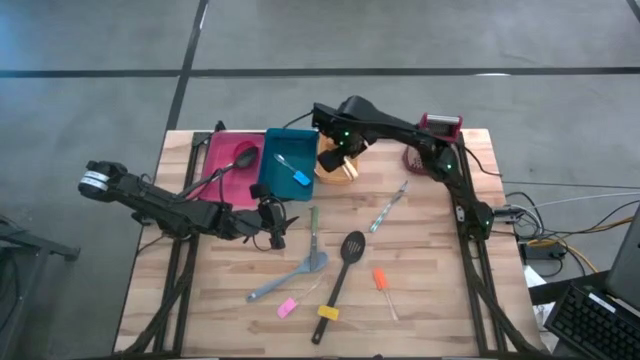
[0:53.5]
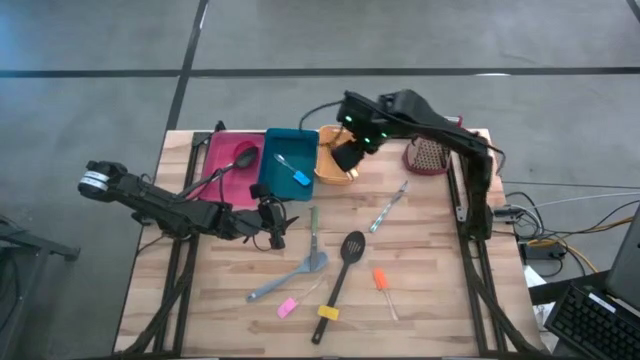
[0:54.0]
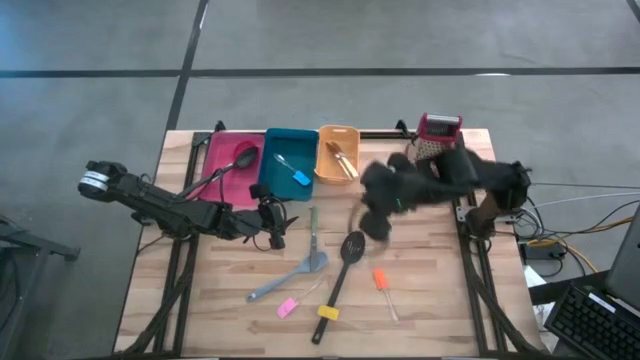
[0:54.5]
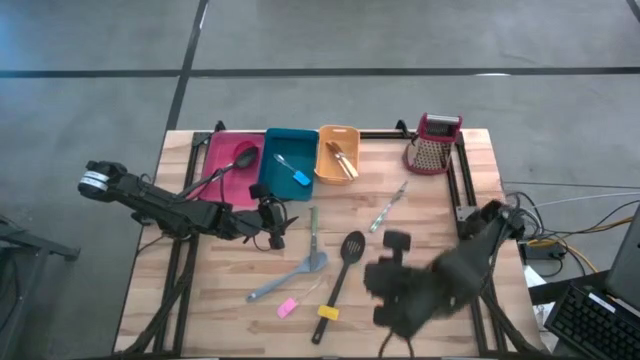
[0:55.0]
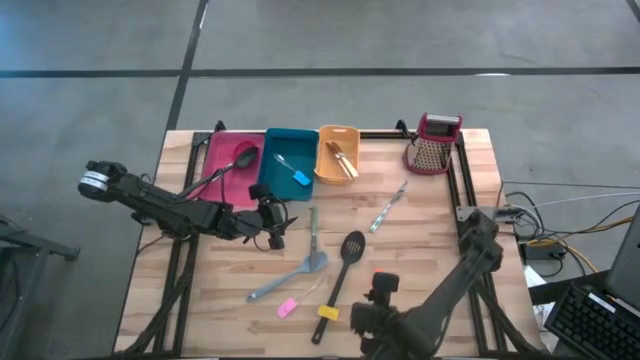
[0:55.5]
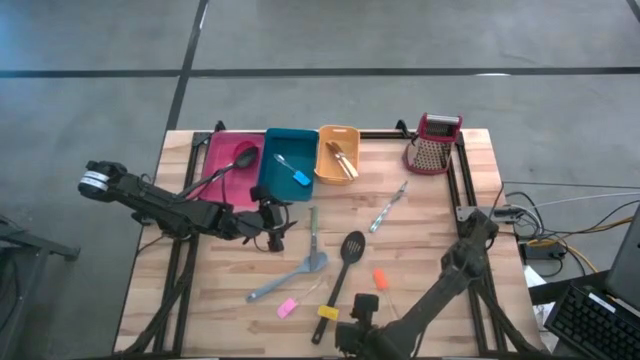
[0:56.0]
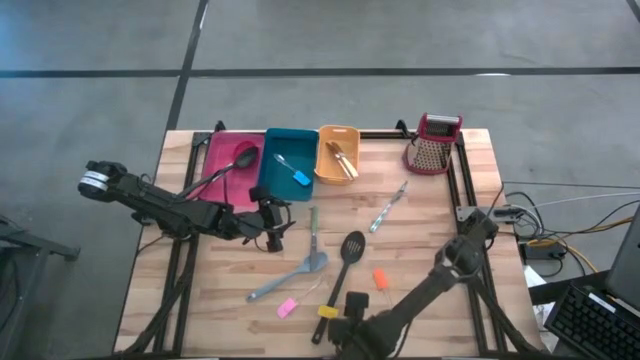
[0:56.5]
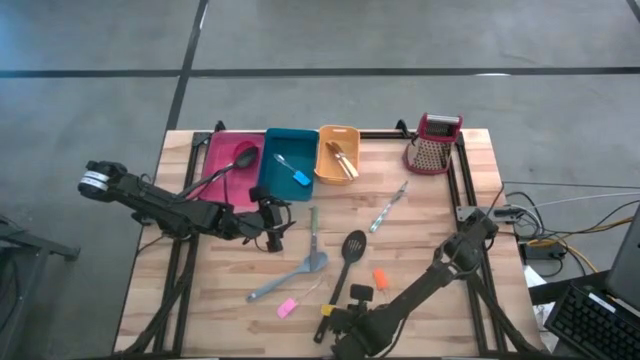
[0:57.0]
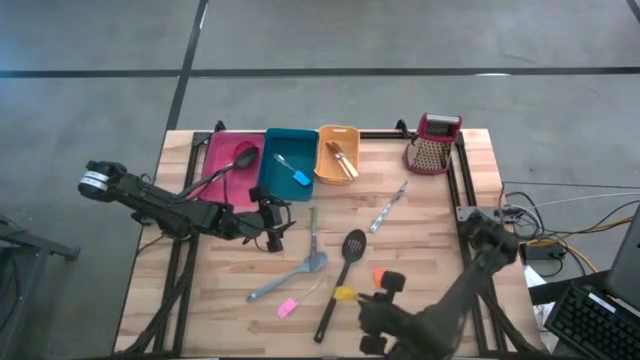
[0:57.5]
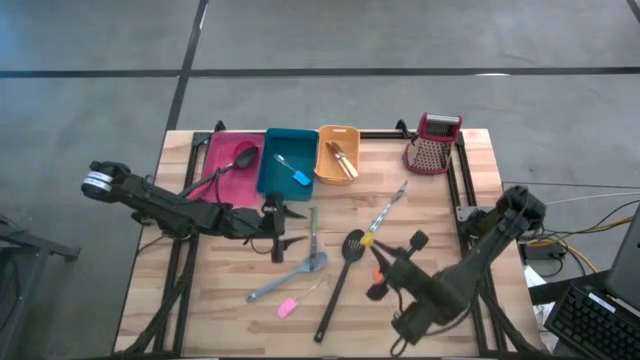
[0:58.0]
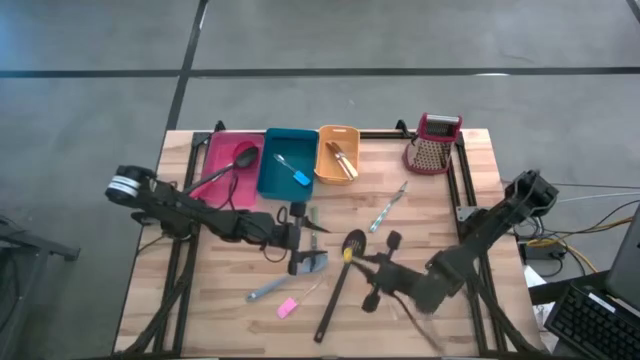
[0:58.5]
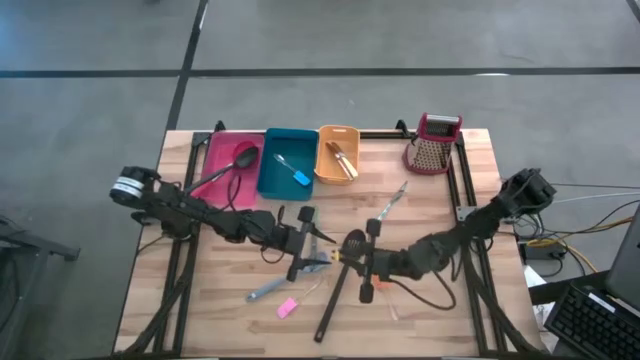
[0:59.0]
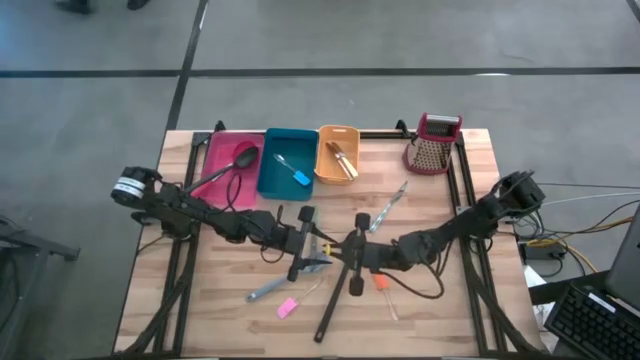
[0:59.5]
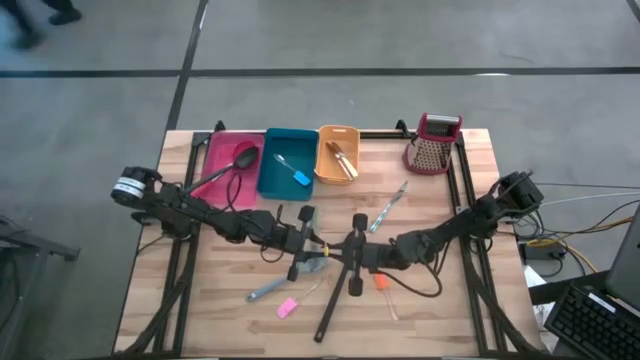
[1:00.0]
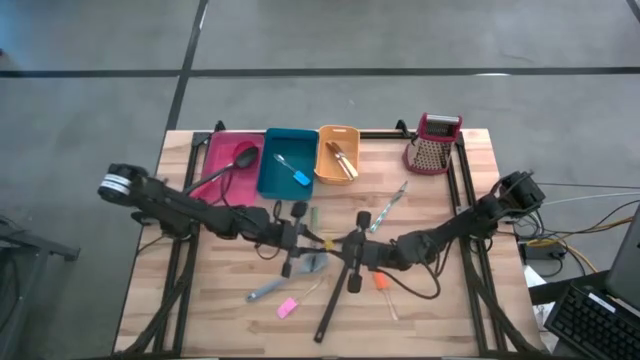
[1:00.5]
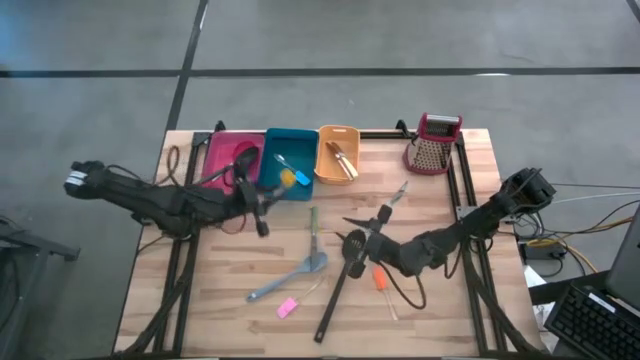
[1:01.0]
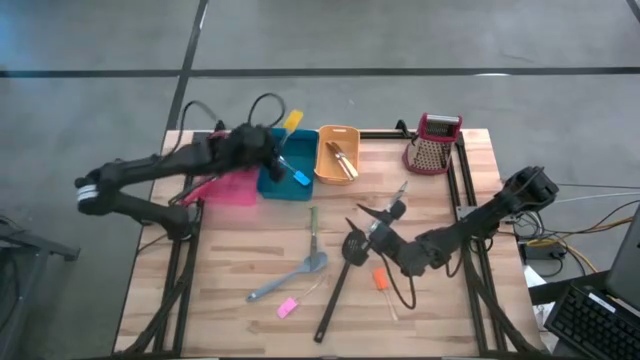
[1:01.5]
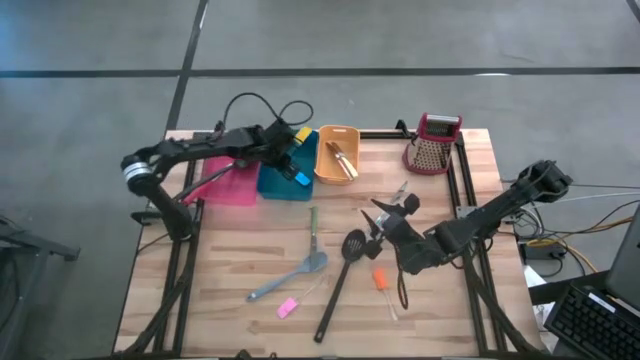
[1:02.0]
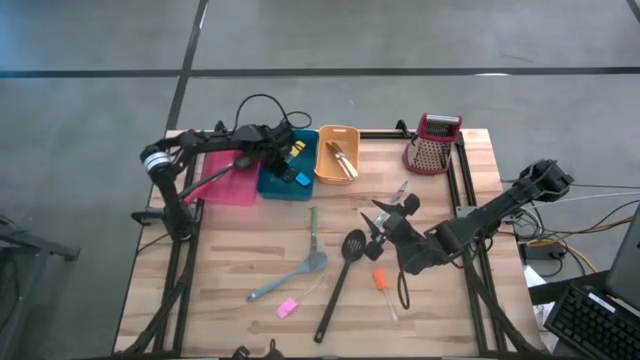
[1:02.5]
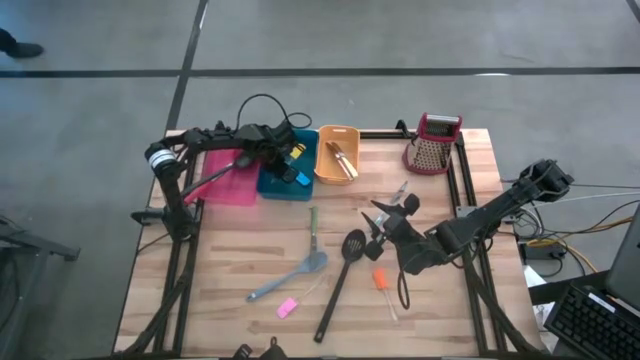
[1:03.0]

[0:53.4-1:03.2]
Task: Pick & Place Kitchen Items
Put the yellow spatula into the blue bin

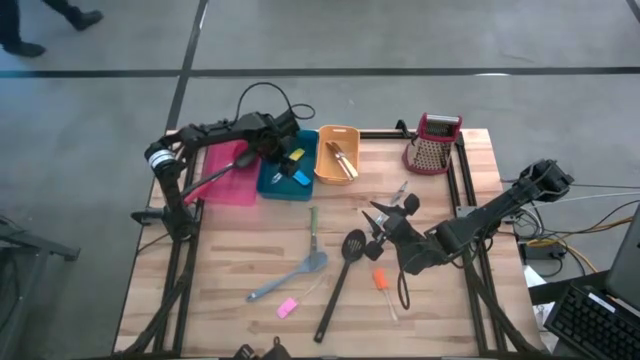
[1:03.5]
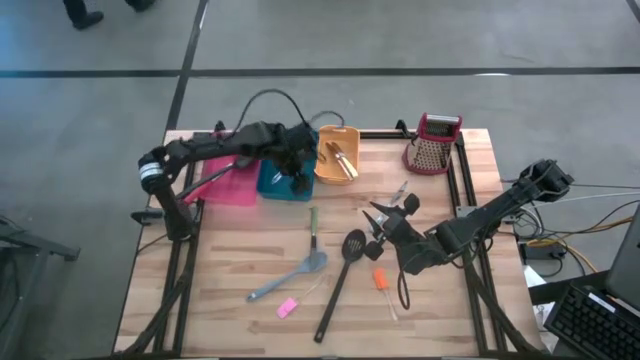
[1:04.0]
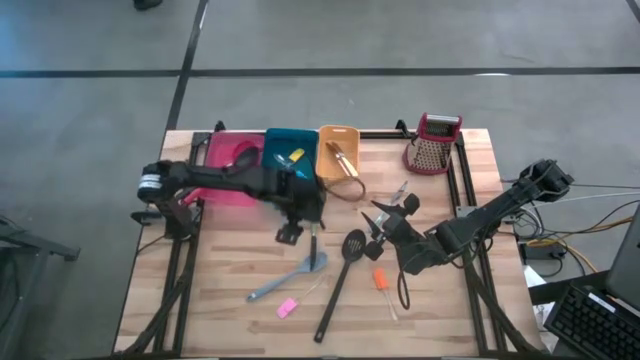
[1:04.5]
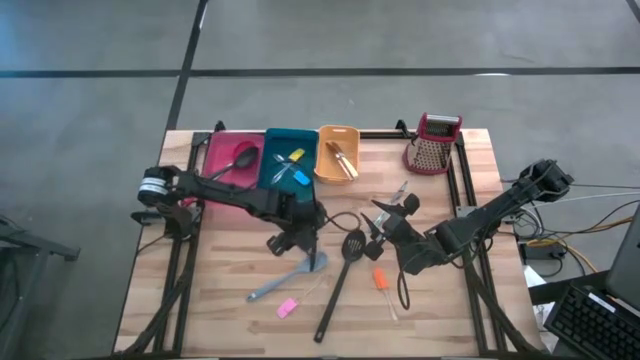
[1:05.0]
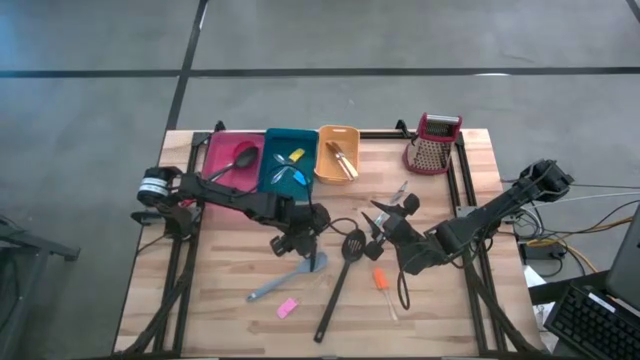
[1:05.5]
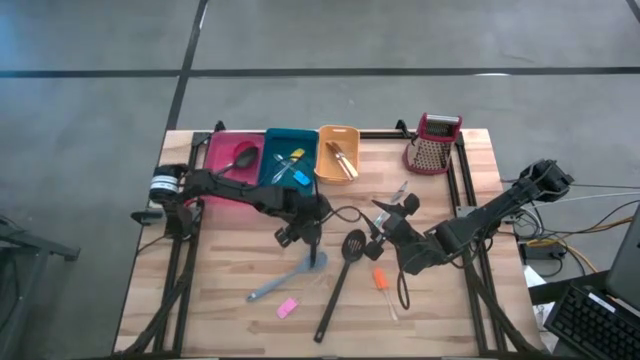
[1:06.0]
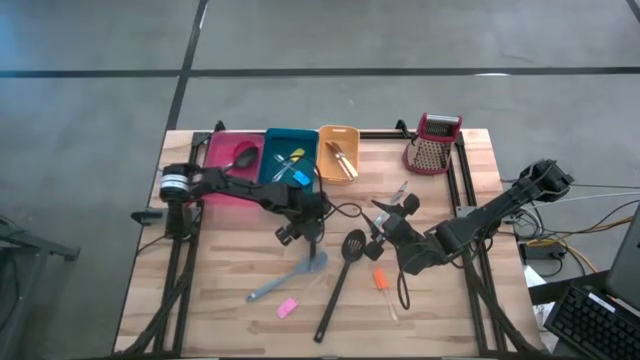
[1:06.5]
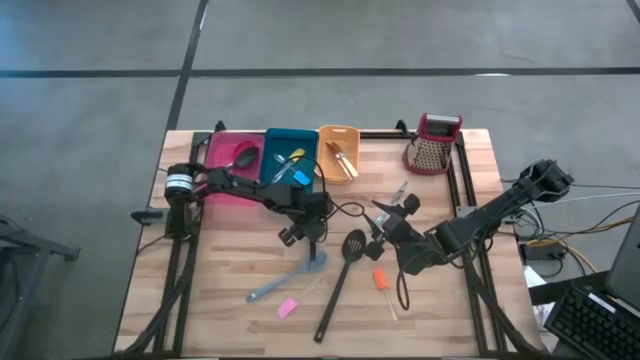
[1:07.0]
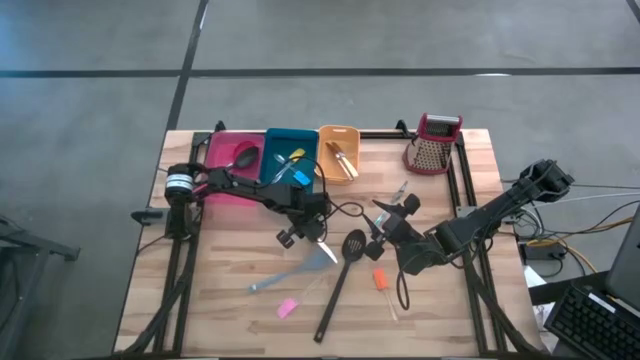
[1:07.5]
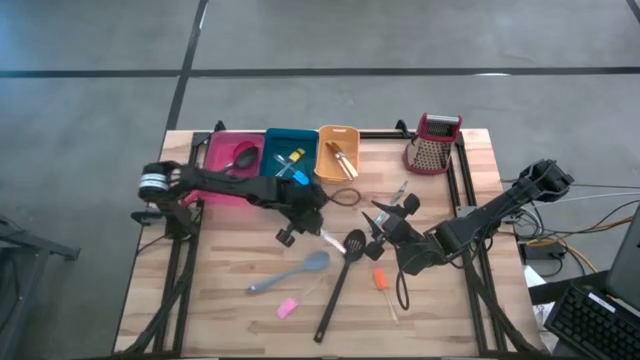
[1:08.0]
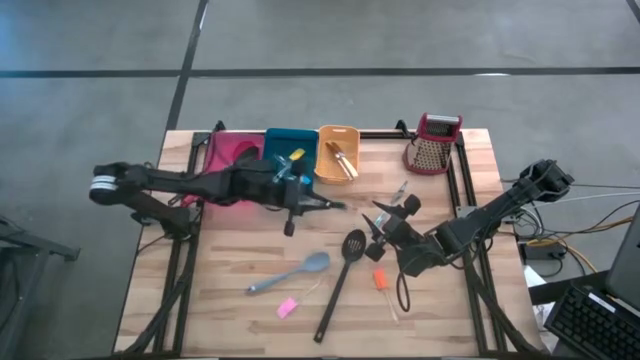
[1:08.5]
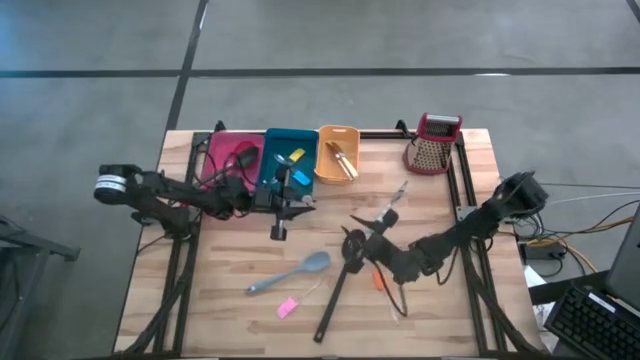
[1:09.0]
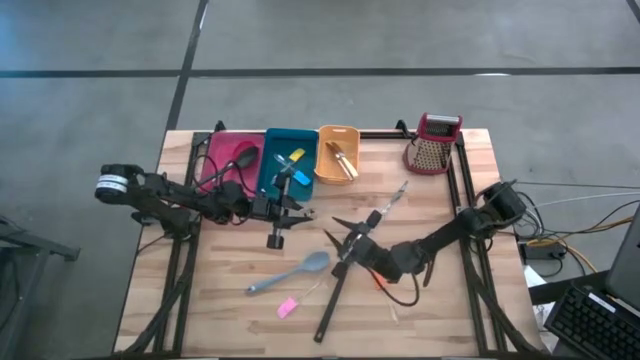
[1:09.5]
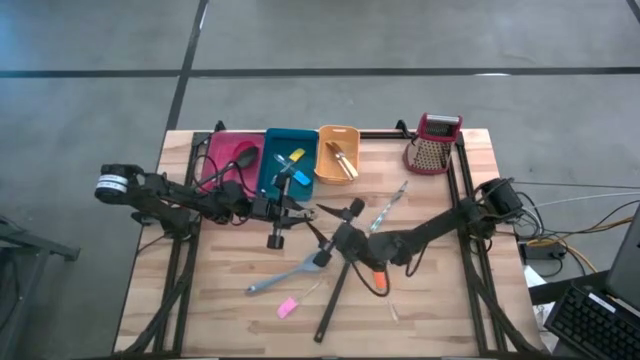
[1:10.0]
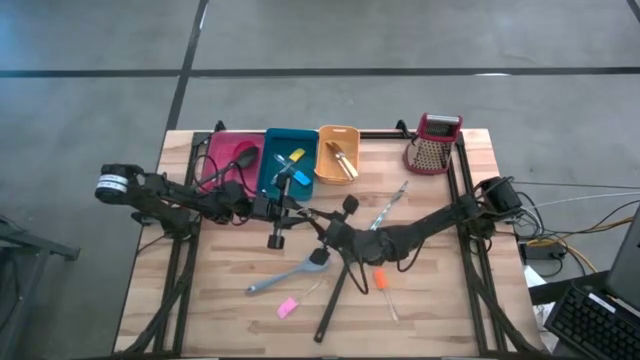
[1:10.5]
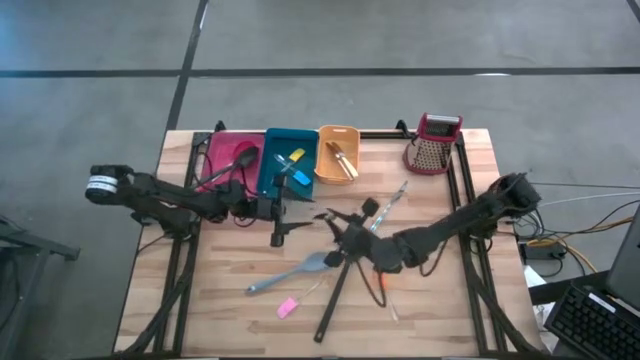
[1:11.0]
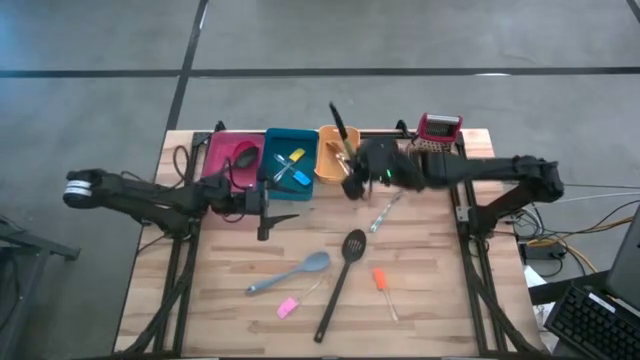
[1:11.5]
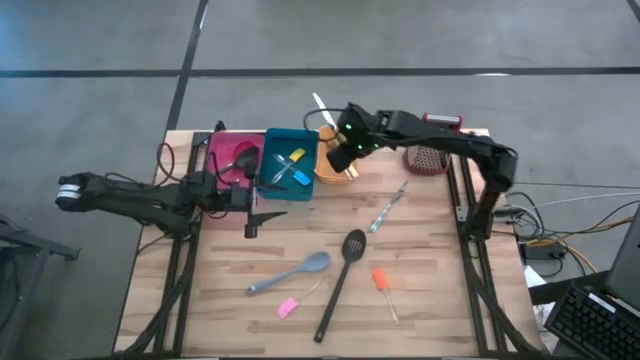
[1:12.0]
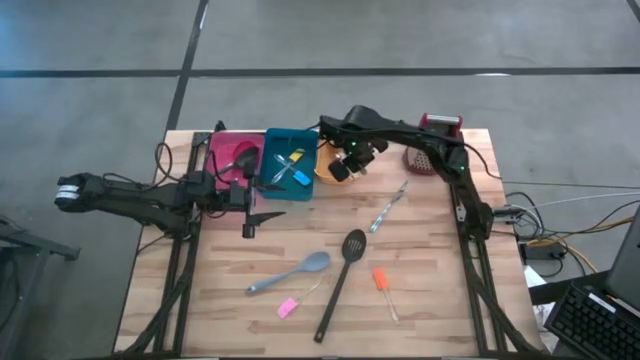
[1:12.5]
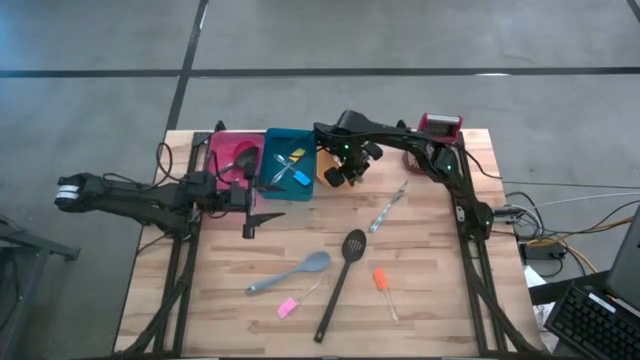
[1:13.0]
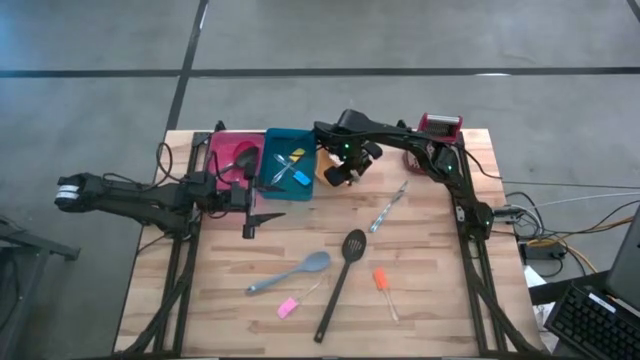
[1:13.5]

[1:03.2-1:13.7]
Put the green knife into the yellow bin

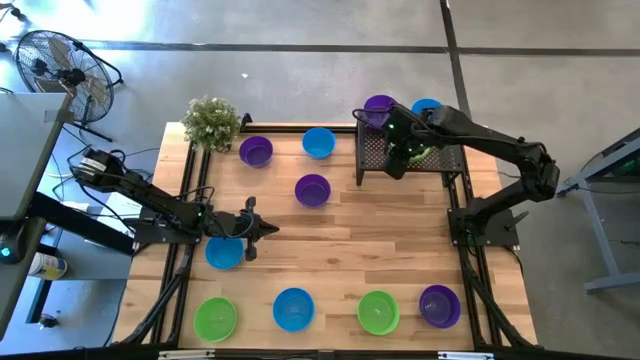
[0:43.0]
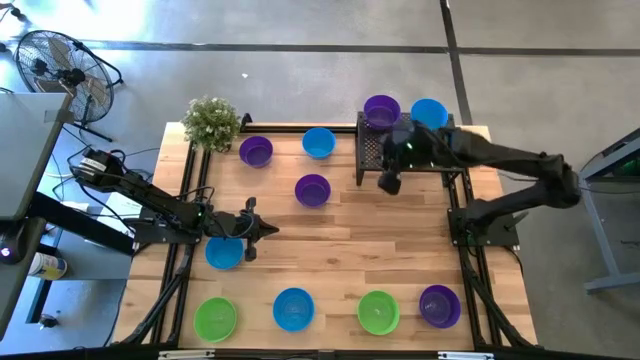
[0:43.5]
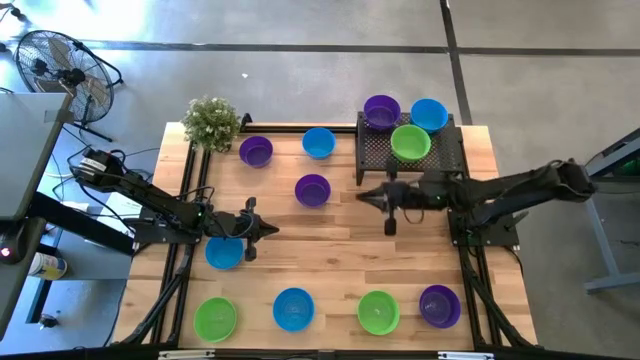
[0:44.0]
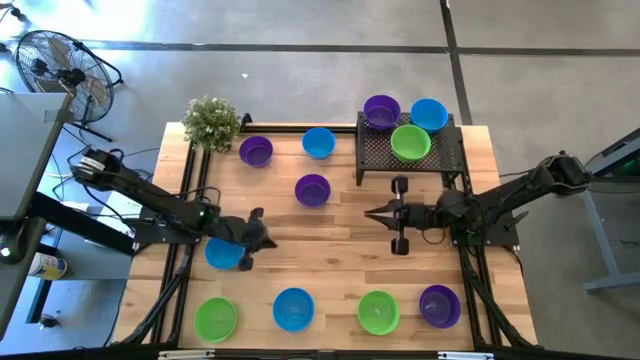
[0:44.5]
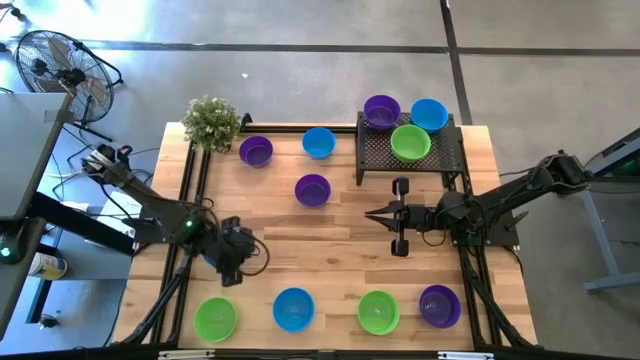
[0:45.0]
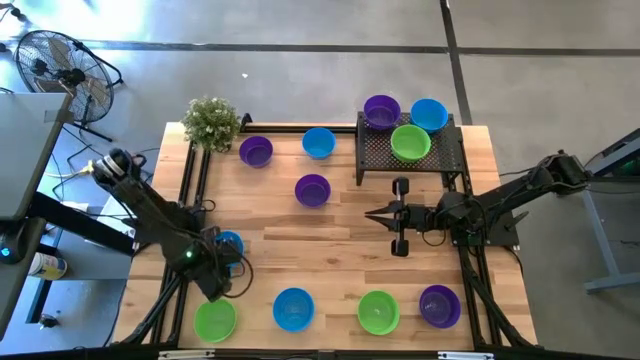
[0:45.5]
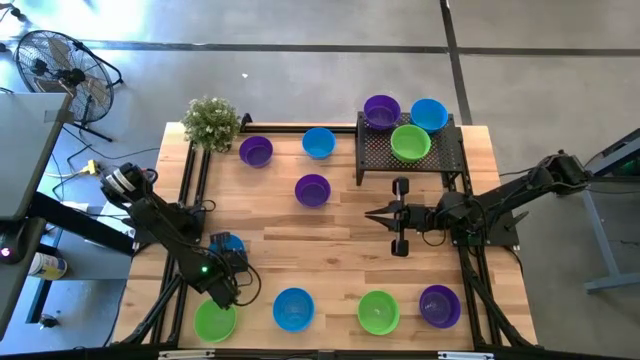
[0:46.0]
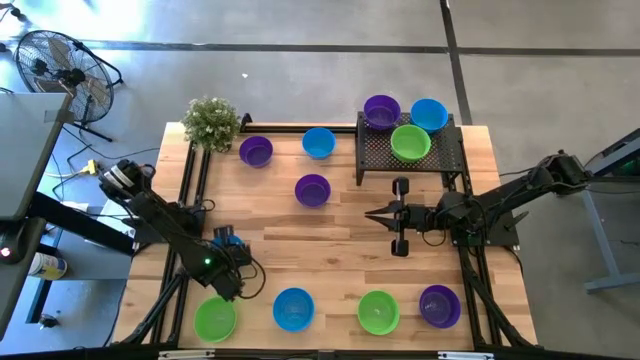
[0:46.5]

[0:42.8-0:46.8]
Task: Pick & Place Mini bowls
Stack the blue bowl on the other blue bowl on the shelf
